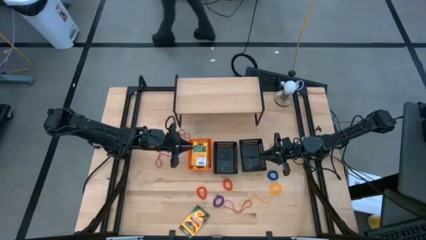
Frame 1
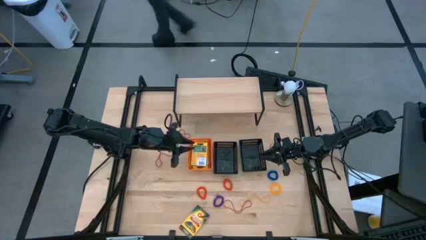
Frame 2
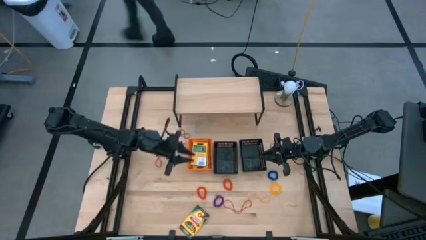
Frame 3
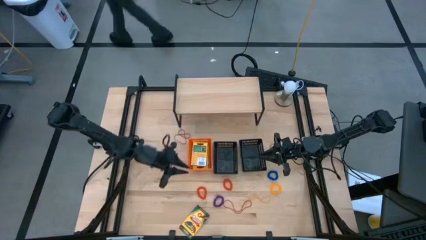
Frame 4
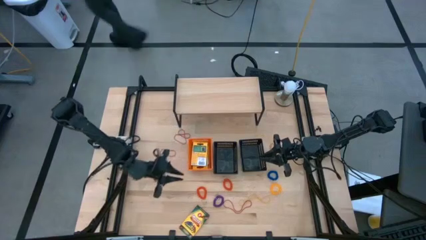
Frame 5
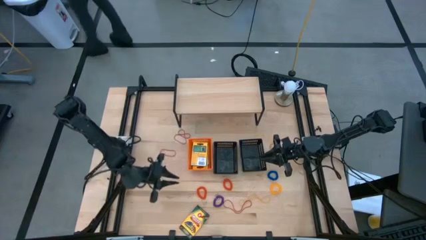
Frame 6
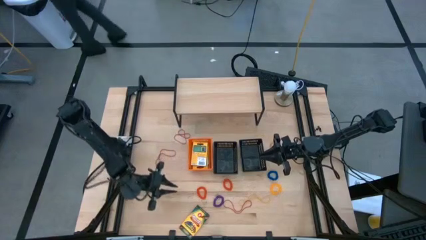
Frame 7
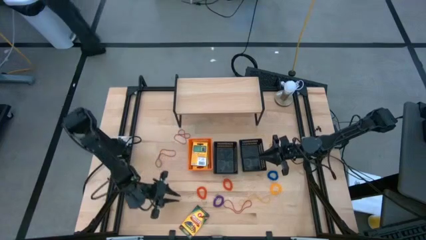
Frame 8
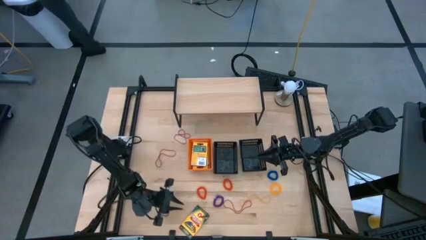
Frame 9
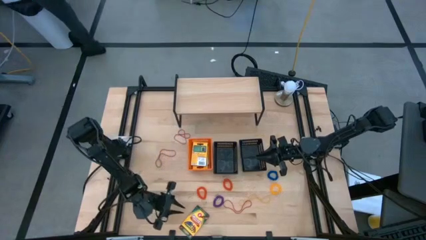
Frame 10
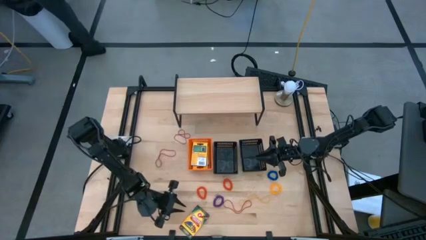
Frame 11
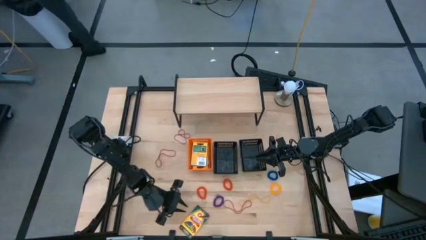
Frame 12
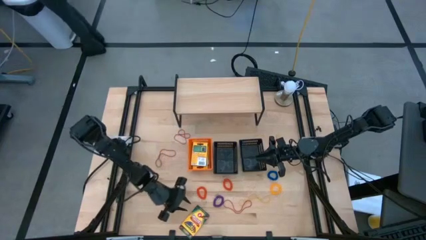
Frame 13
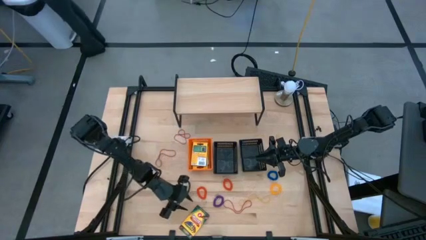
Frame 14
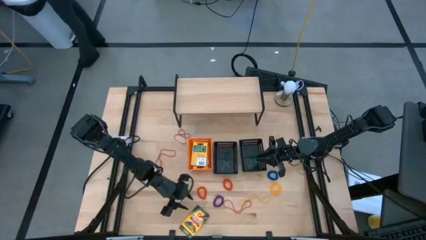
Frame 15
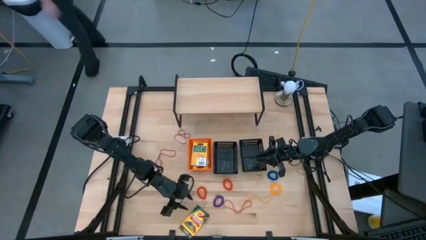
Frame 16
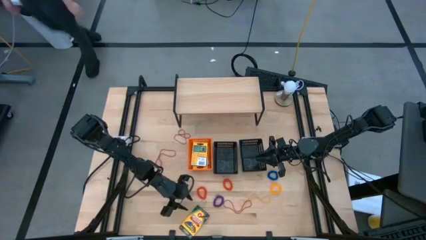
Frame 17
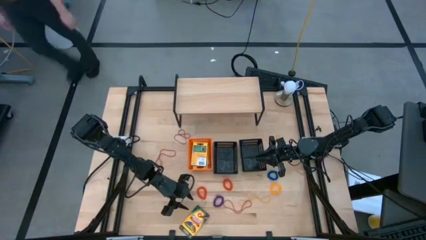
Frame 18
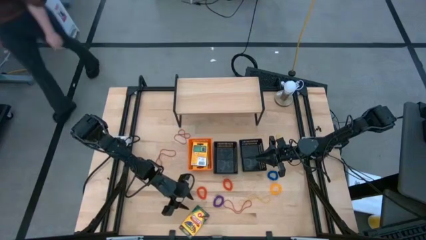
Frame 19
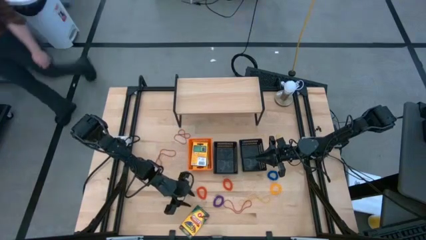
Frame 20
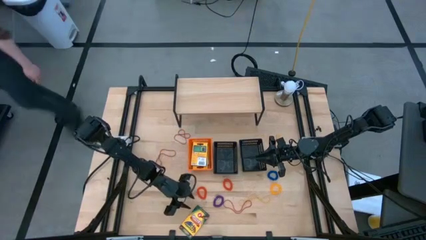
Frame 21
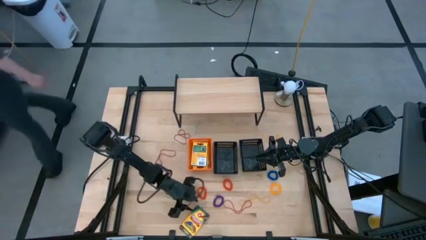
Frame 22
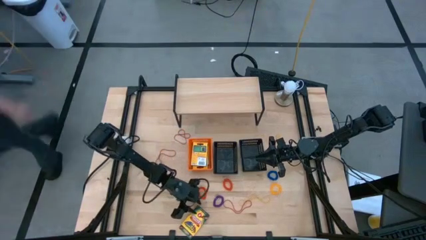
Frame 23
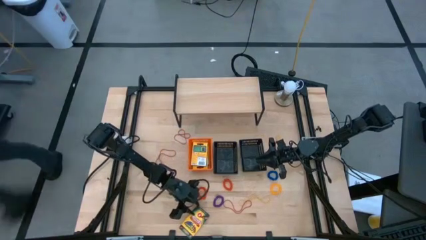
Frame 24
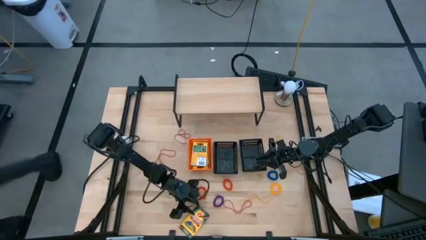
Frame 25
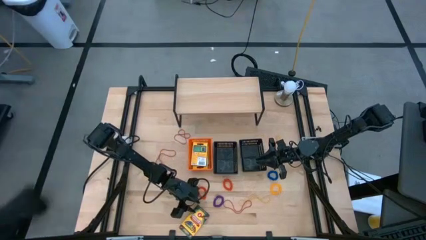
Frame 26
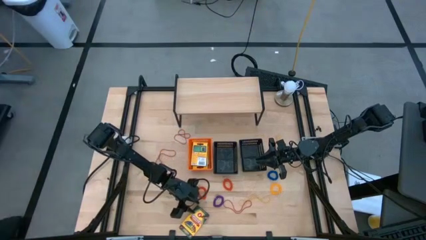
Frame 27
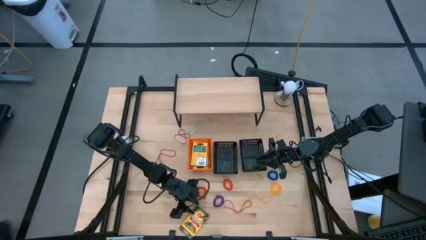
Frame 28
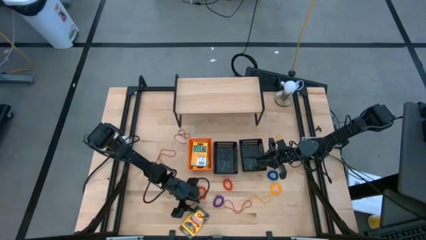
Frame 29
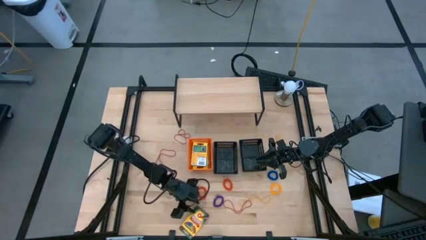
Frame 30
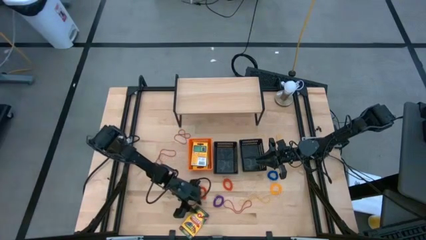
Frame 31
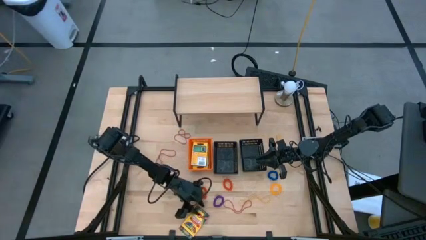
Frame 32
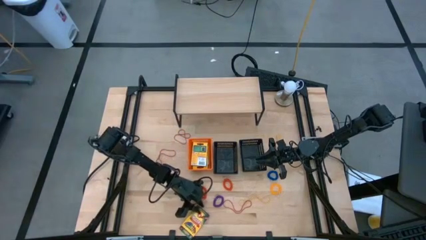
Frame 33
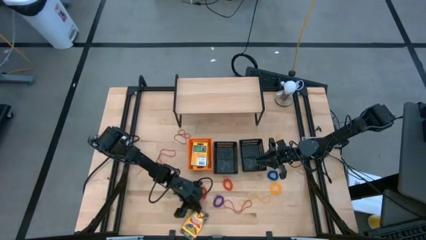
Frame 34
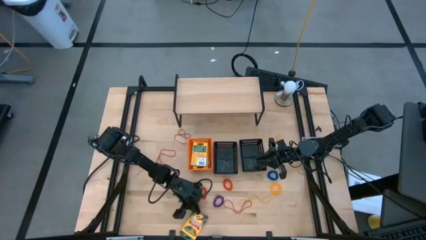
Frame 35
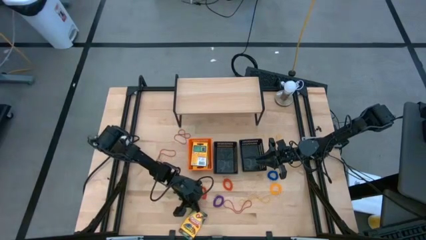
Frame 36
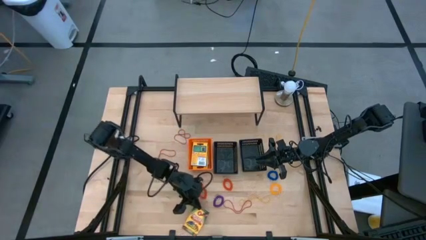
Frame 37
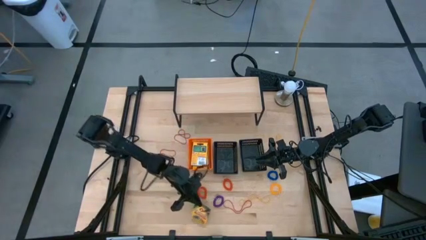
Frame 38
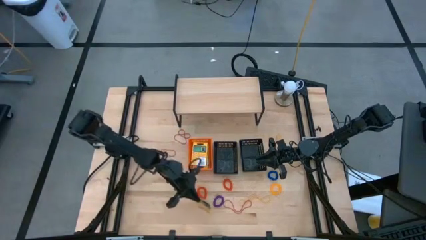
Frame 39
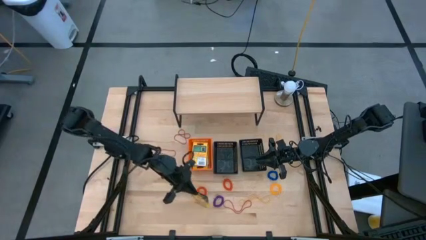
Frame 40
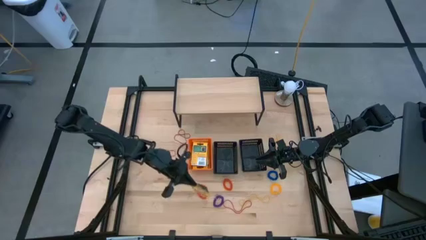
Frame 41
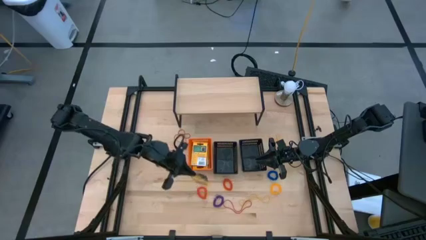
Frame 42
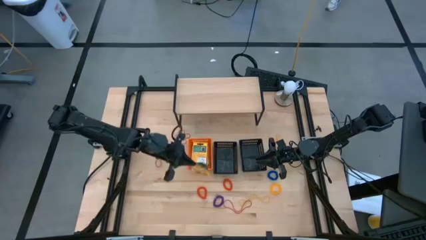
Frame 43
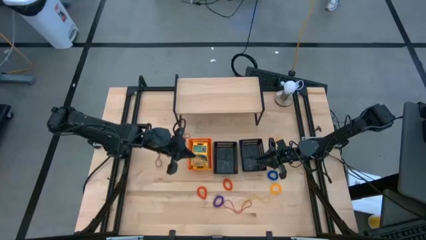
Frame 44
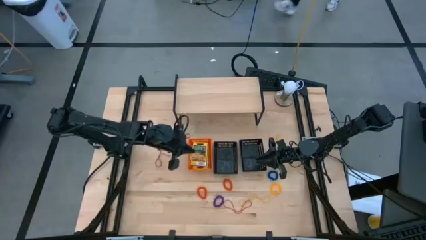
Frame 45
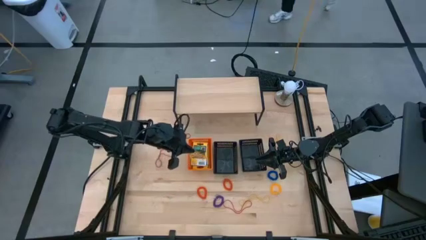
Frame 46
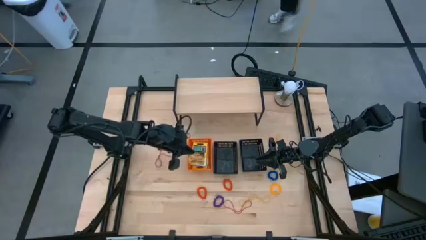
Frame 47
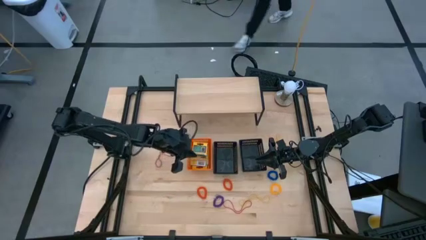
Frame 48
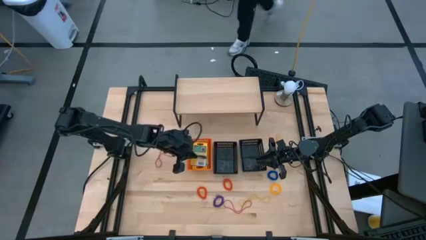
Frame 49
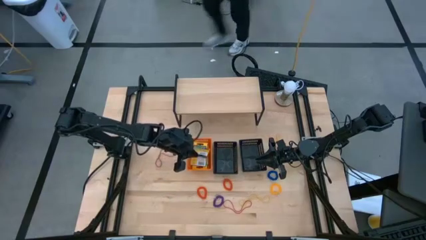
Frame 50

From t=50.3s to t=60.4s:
Task: Pick & Place Office Desk Supplies
Put the yellow crayon box into the orange bin

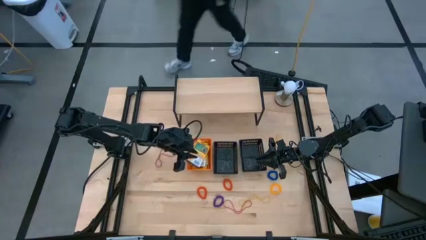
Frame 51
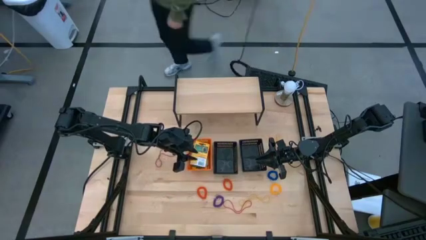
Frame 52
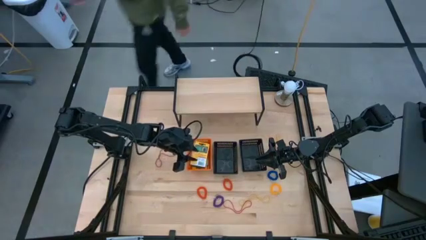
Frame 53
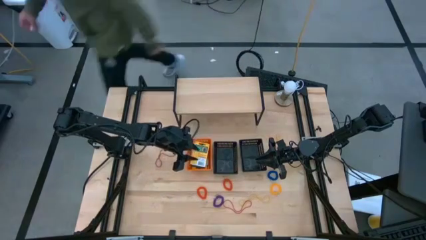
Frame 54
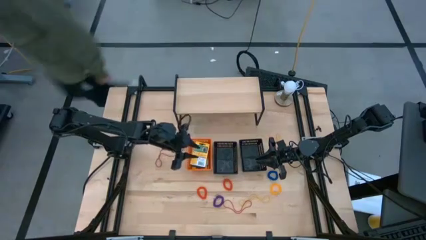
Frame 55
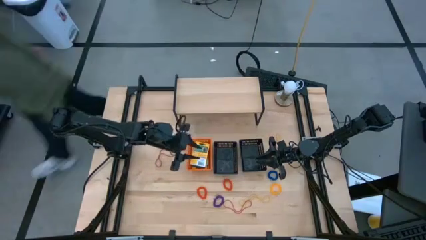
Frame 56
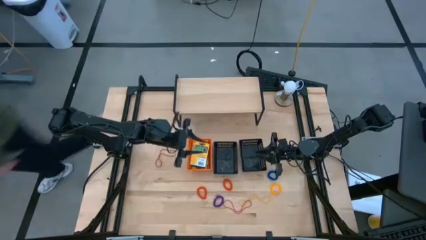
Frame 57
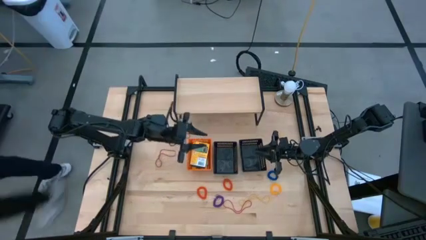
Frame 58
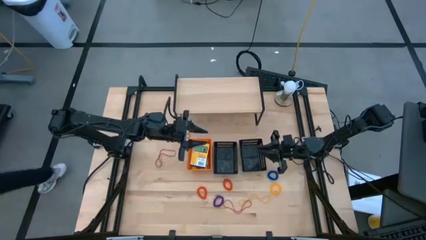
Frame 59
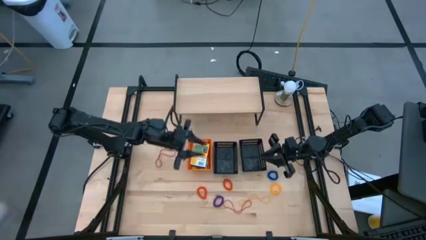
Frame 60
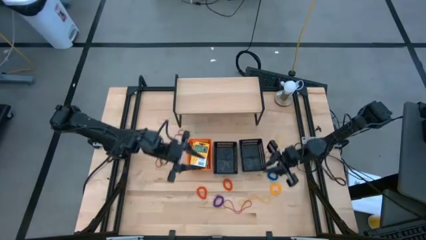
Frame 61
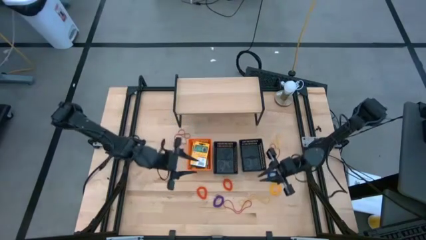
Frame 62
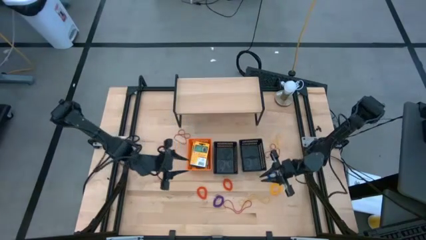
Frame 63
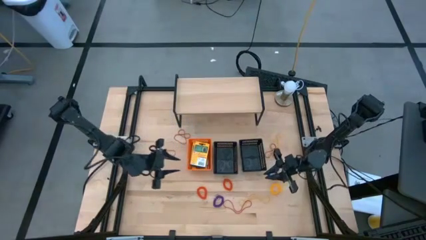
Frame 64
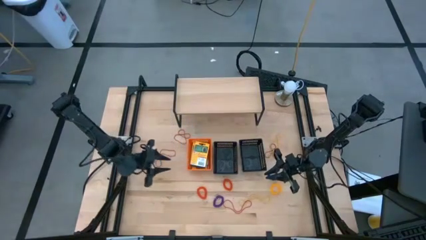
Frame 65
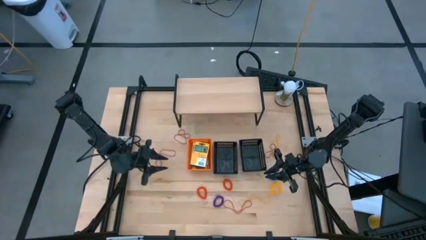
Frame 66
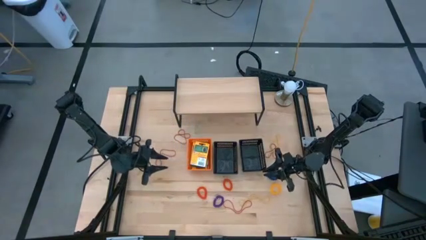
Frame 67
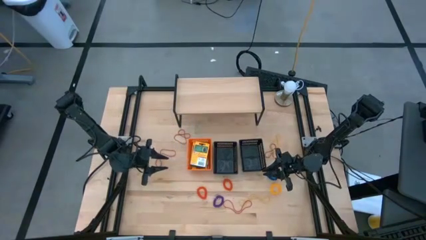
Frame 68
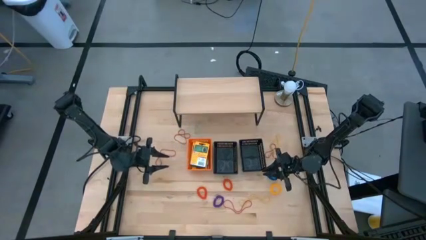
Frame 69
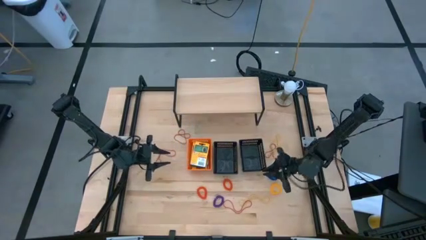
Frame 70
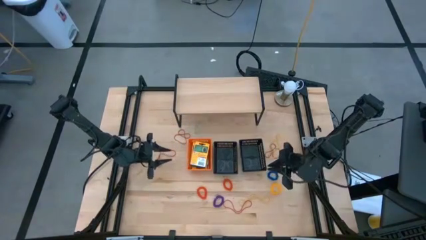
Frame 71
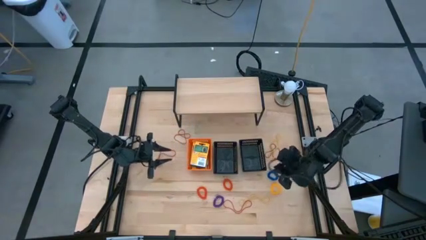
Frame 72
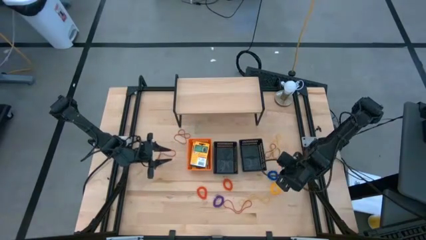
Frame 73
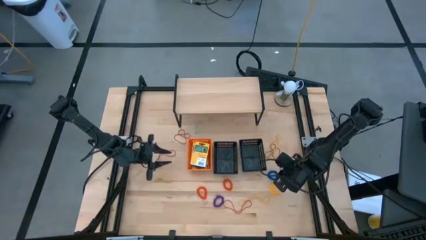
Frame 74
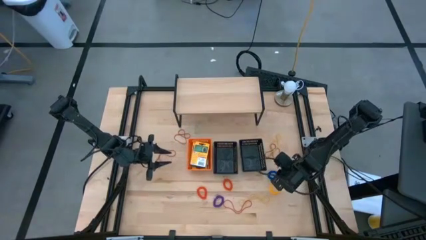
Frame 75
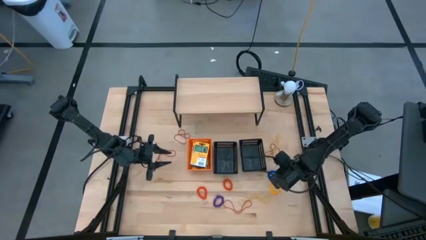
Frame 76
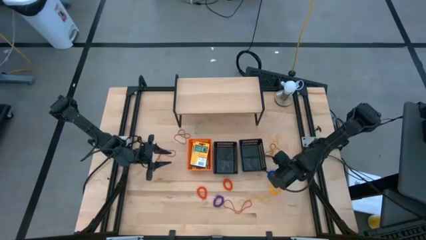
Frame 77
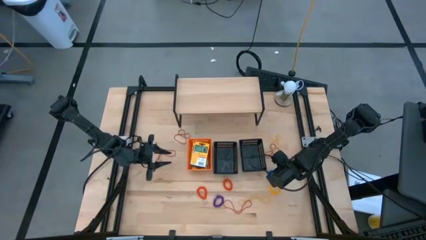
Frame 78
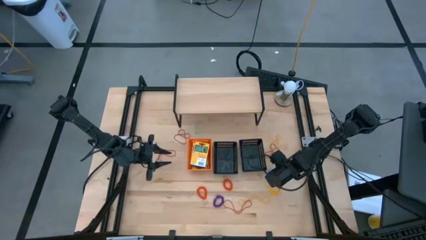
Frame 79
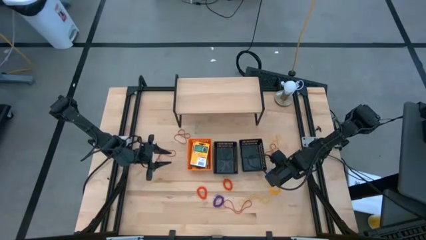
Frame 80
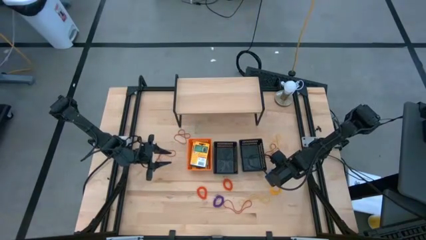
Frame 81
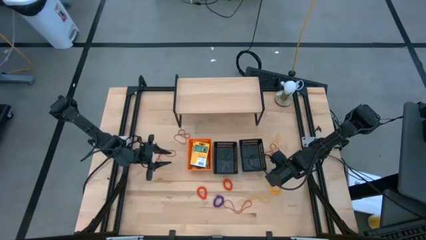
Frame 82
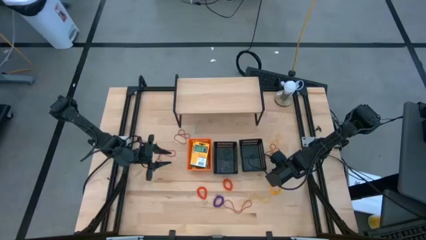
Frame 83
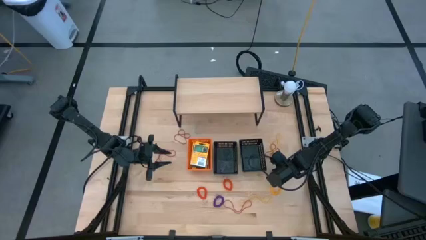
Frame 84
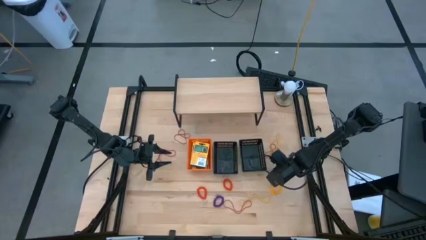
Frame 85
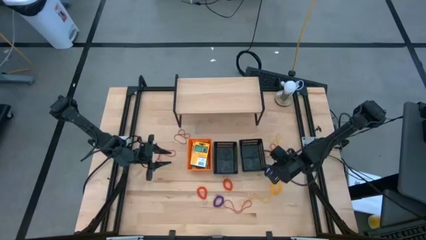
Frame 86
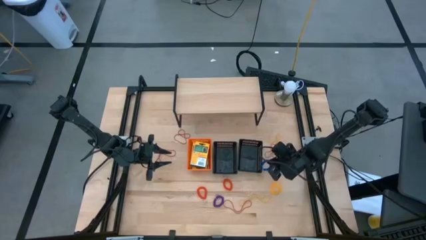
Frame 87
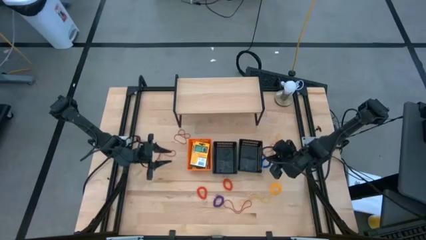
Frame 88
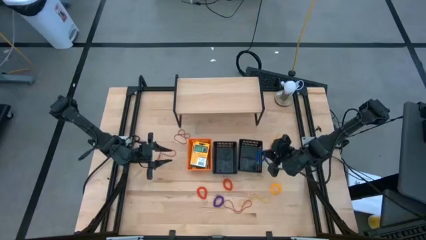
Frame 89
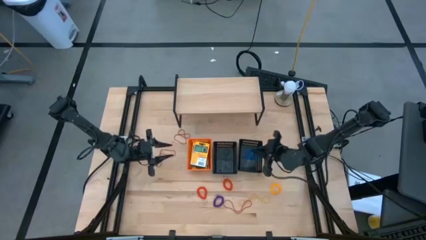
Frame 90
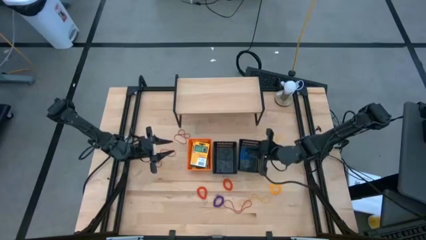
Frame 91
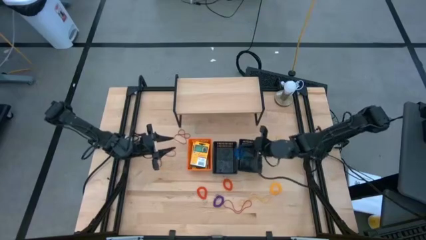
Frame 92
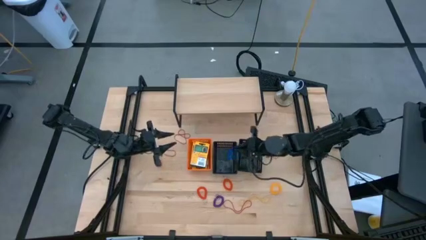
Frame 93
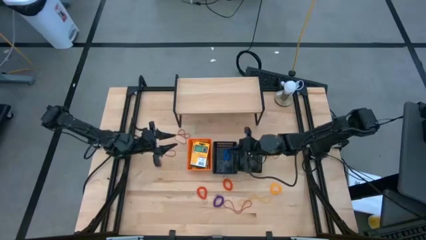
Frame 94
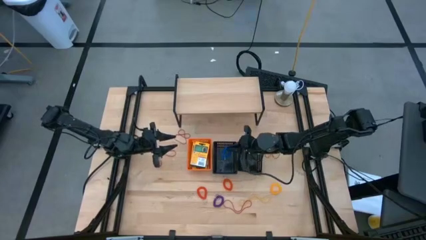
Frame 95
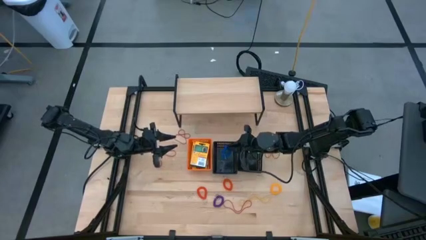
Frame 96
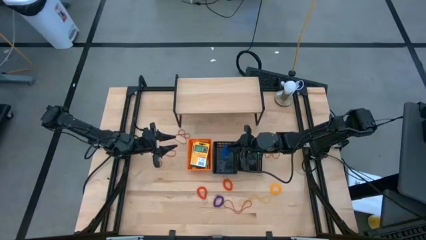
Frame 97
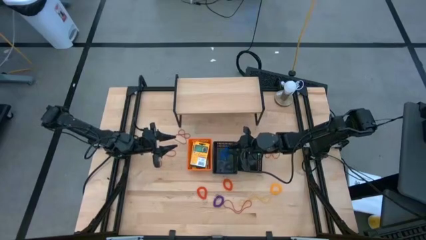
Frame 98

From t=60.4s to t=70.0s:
Put the blue spring keychain into the left black bin
